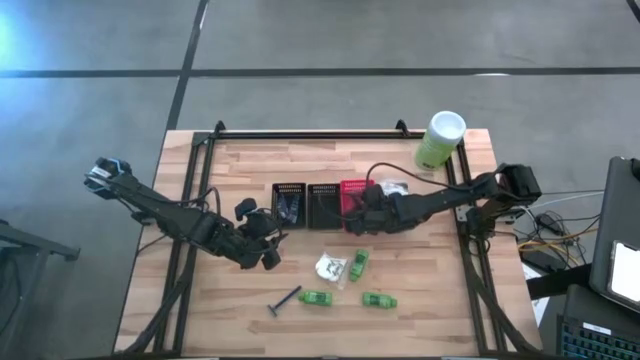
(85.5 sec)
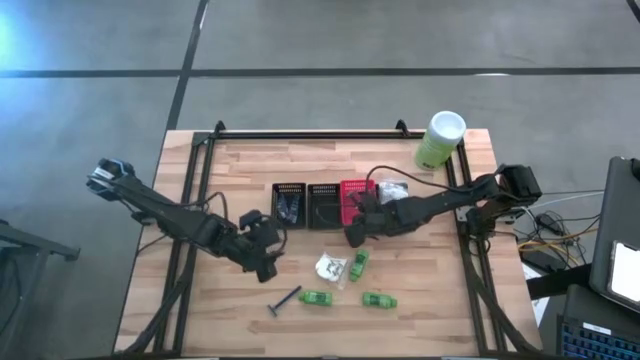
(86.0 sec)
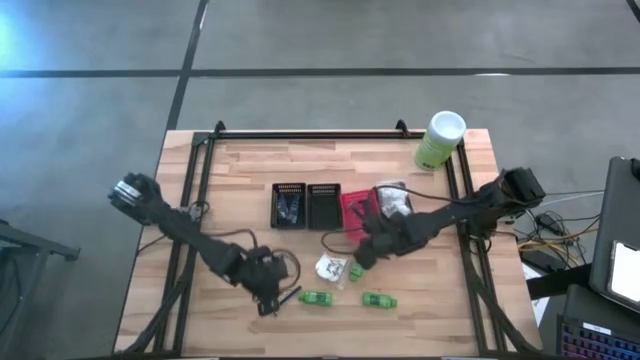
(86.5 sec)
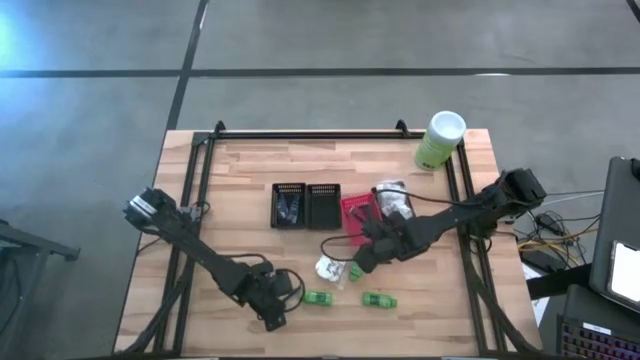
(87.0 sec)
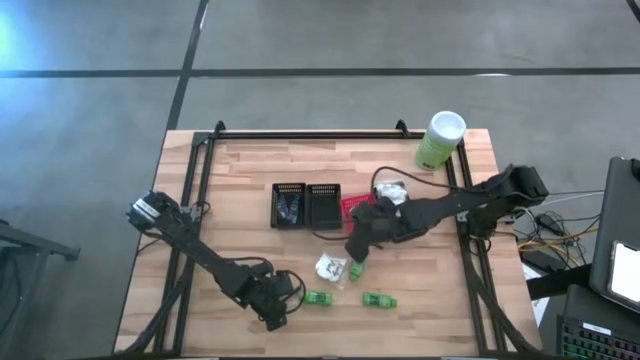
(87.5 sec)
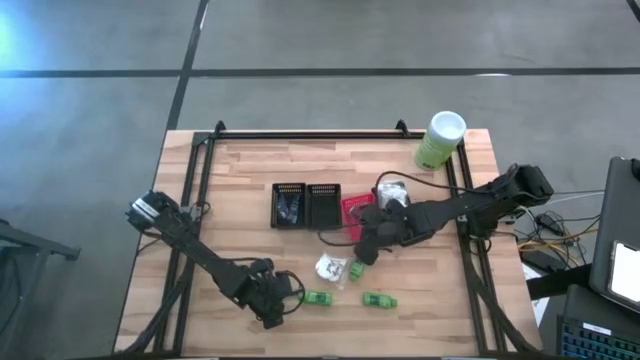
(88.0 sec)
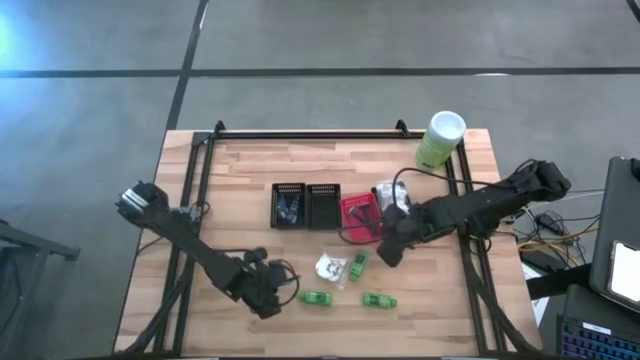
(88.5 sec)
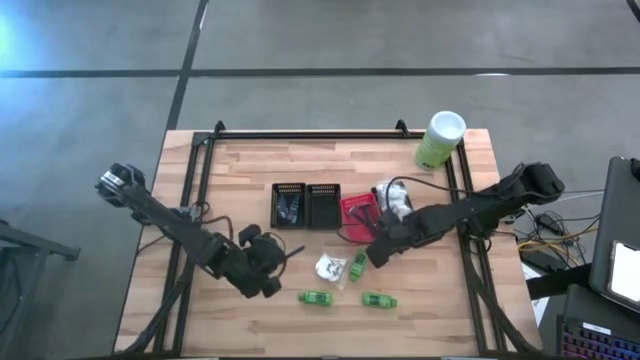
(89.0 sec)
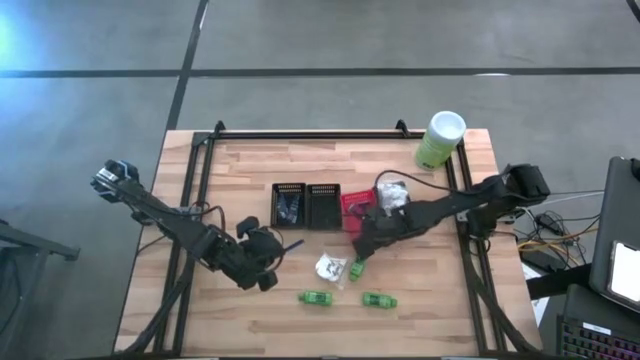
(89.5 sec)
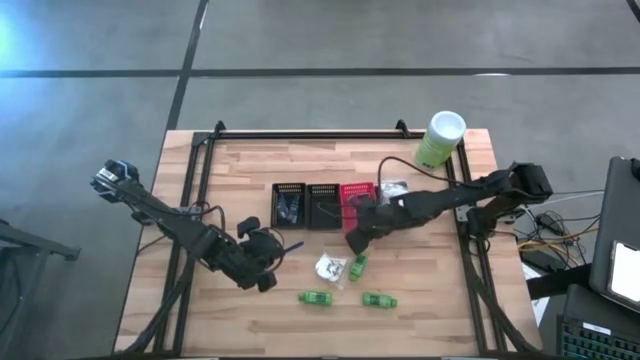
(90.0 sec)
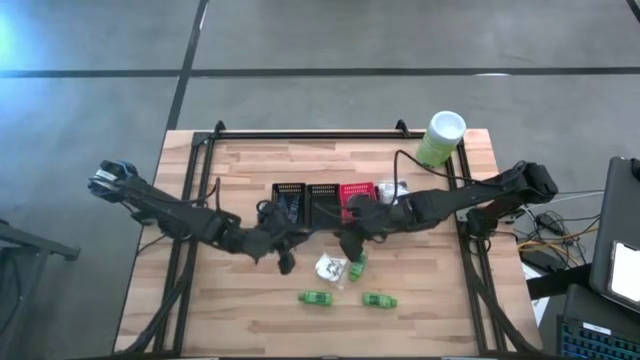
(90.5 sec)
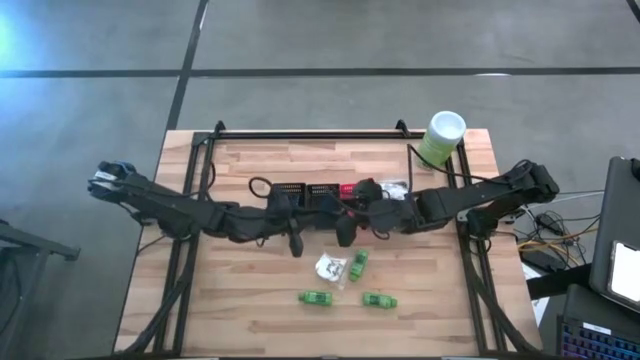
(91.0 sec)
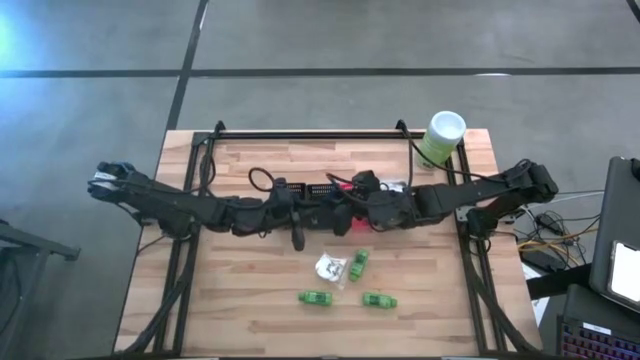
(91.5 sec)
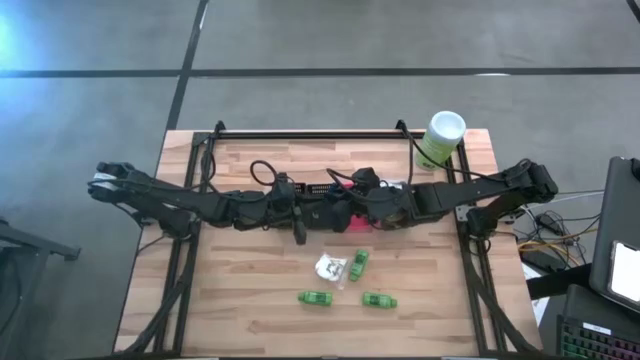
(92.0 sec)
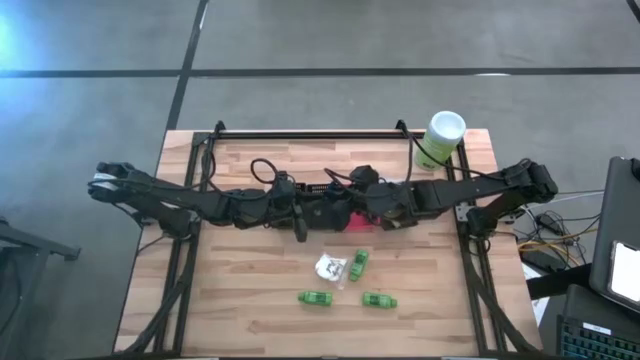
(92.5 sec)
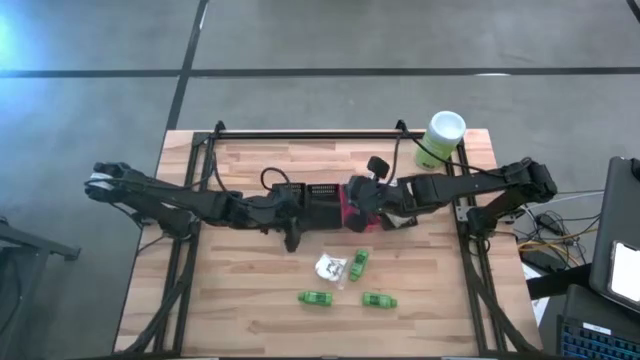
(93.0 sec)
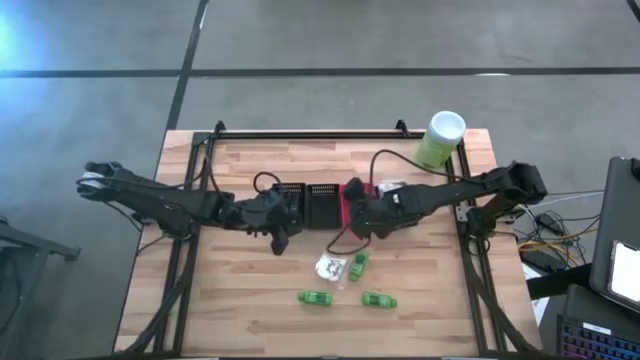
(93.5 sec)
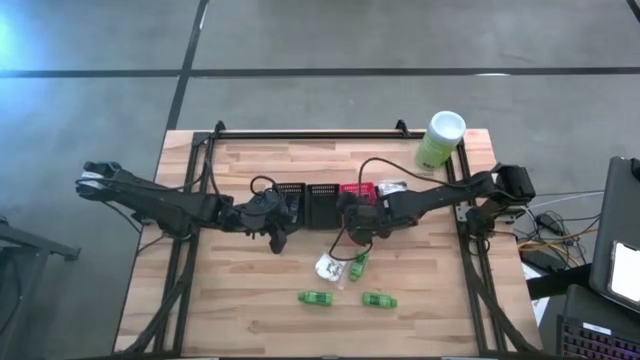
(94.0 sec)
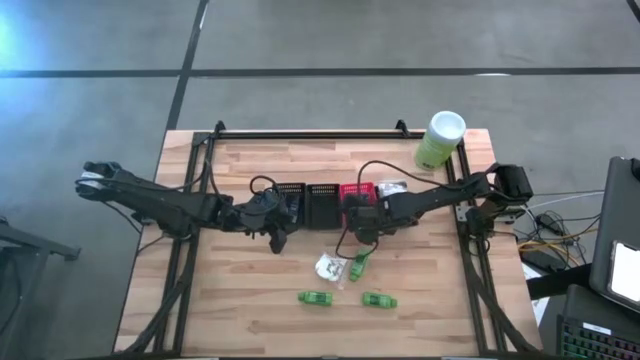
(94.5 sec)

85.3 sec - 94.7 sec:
Task: Pick & Place Travel size toiletries
Put the blue razor into the orange basket

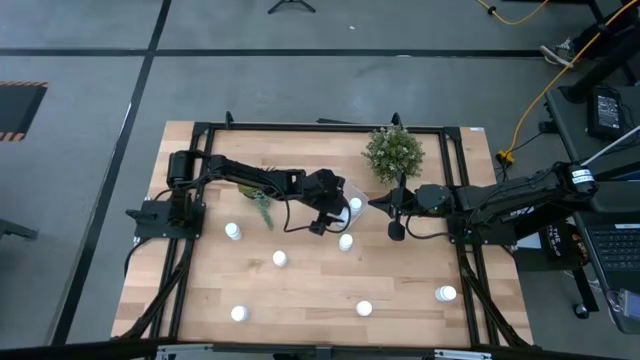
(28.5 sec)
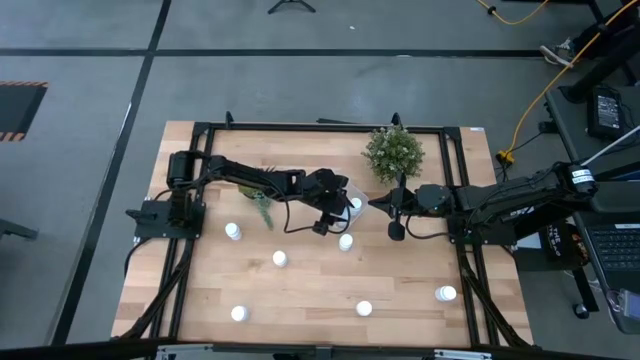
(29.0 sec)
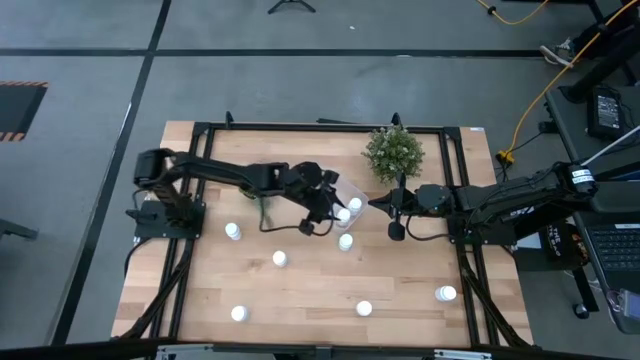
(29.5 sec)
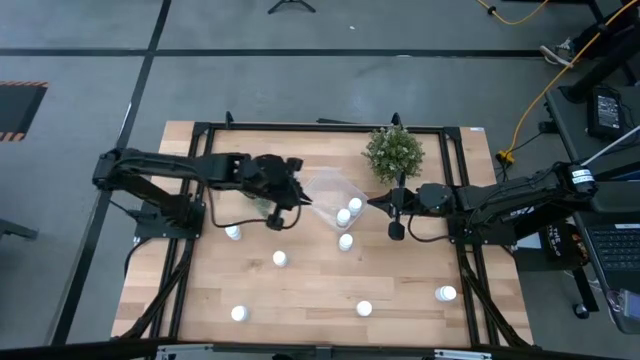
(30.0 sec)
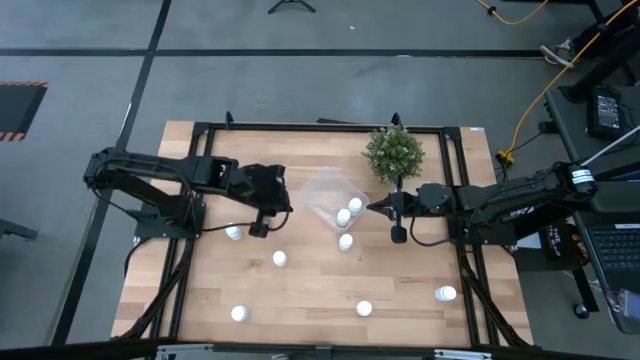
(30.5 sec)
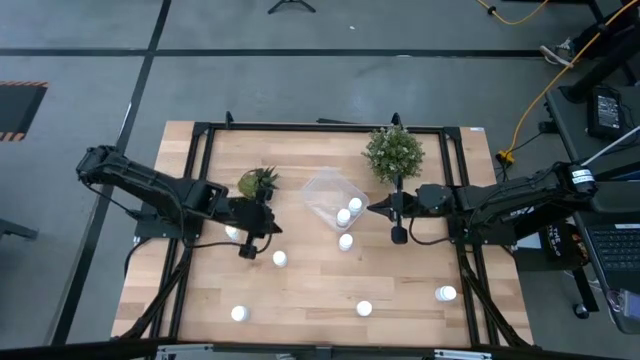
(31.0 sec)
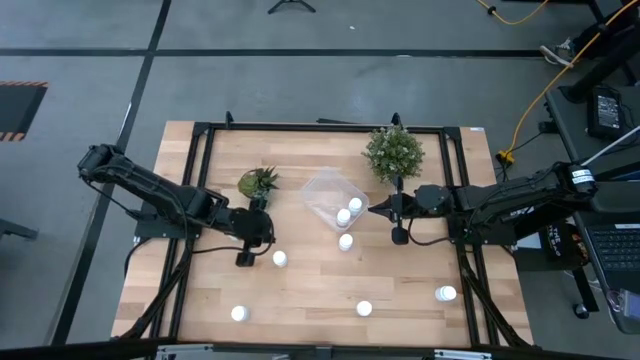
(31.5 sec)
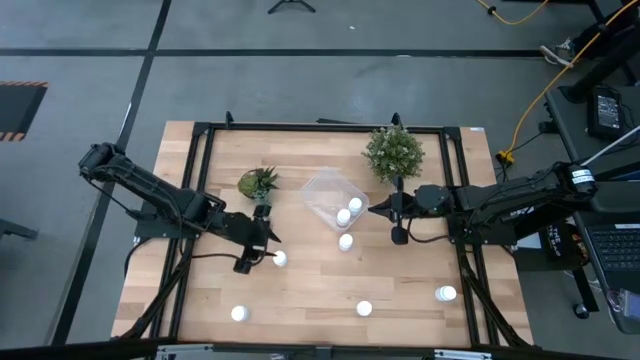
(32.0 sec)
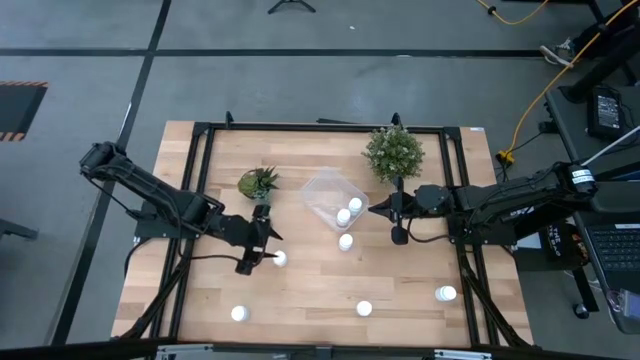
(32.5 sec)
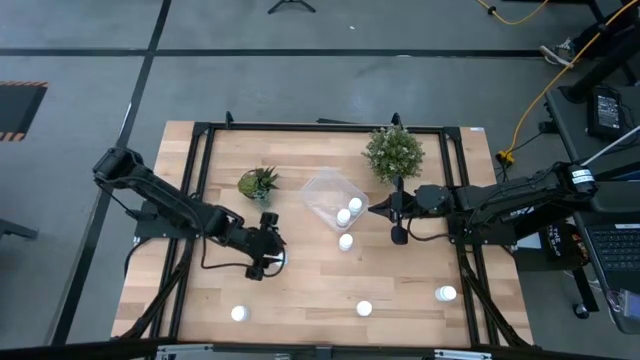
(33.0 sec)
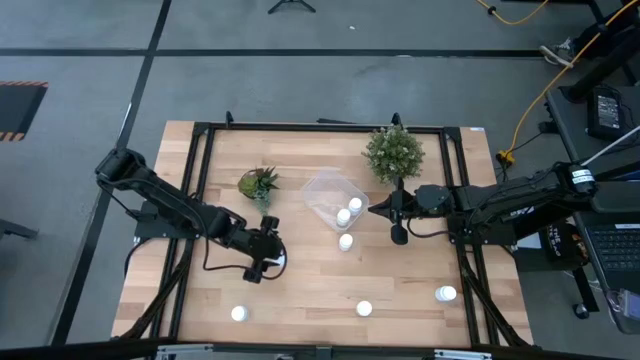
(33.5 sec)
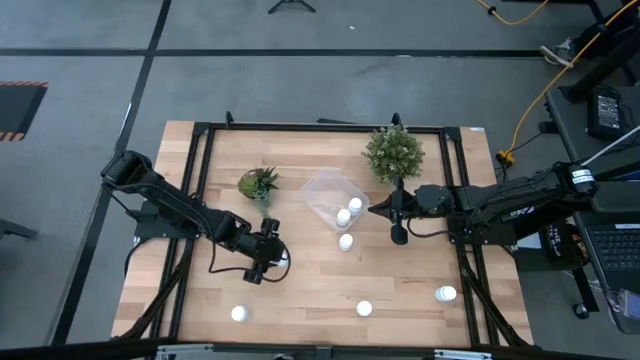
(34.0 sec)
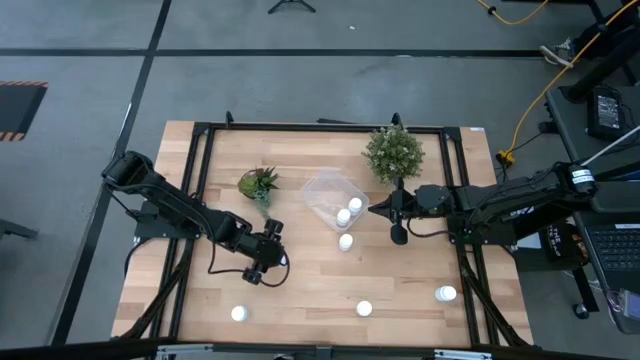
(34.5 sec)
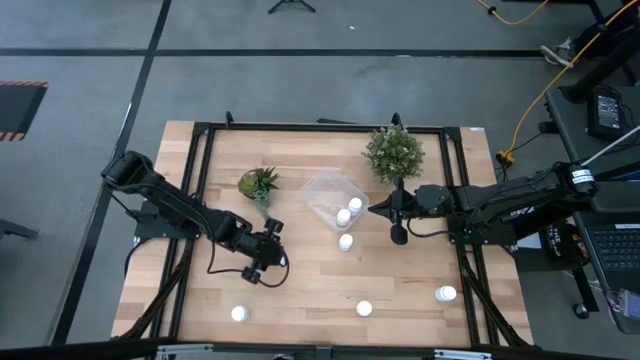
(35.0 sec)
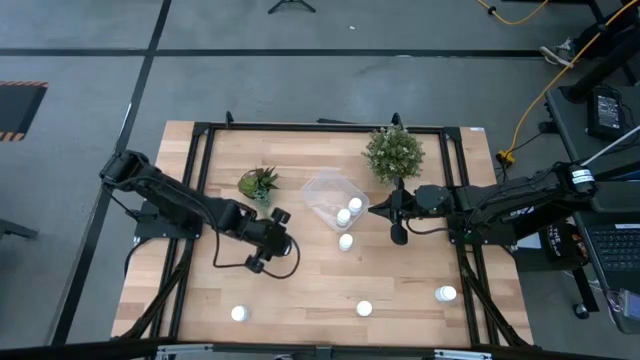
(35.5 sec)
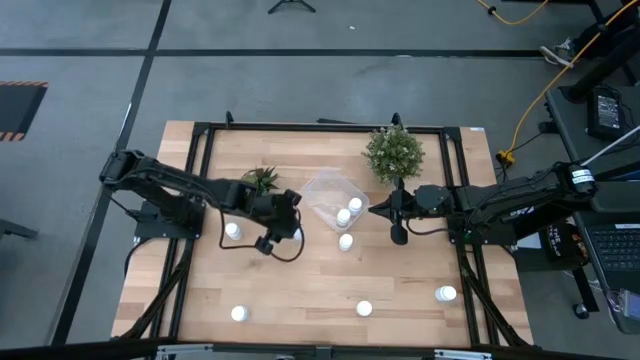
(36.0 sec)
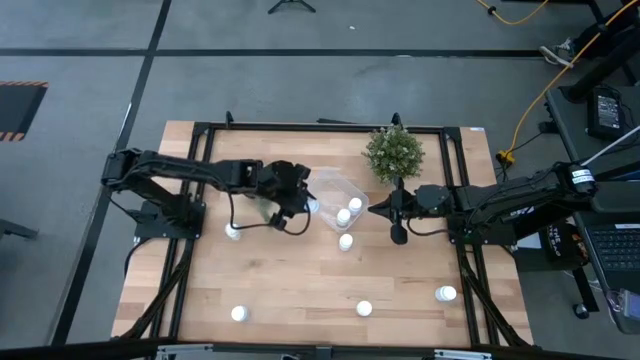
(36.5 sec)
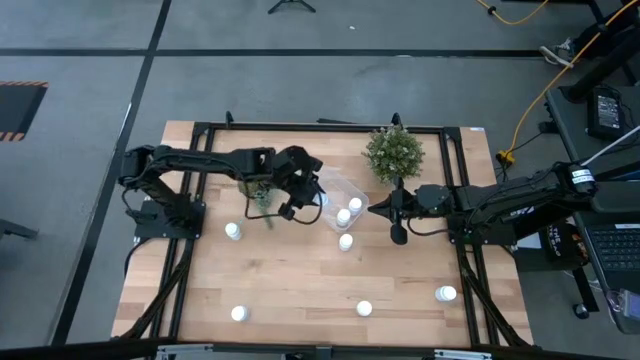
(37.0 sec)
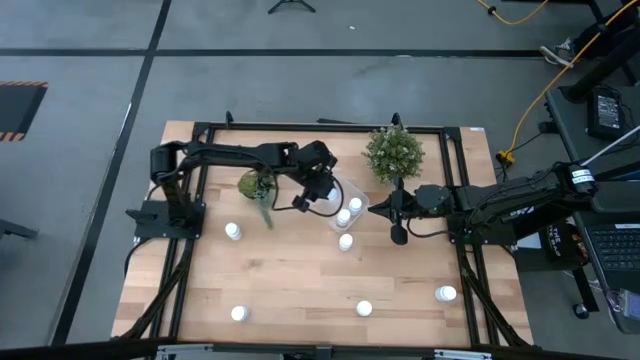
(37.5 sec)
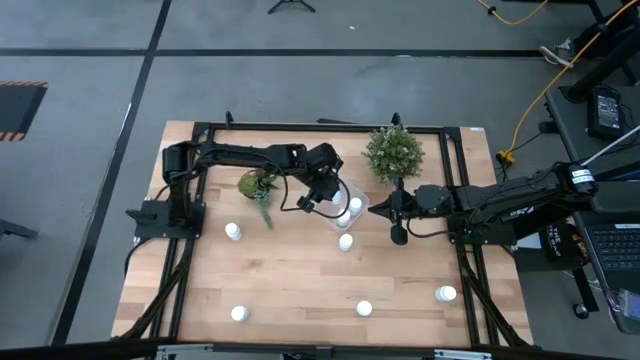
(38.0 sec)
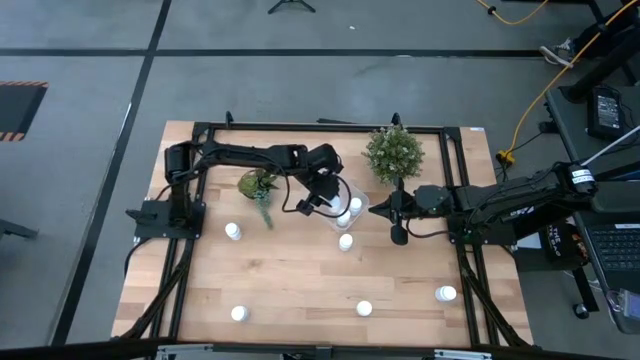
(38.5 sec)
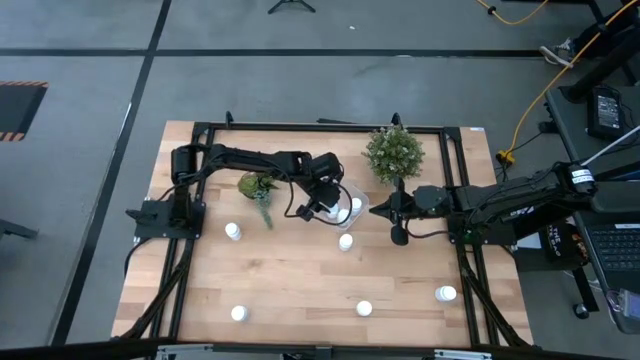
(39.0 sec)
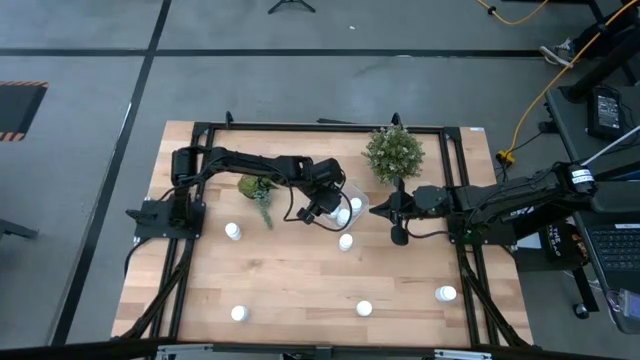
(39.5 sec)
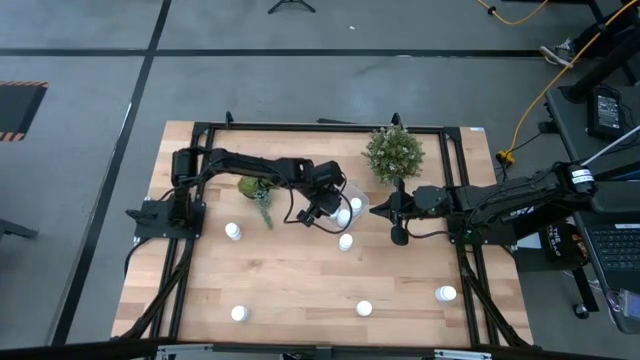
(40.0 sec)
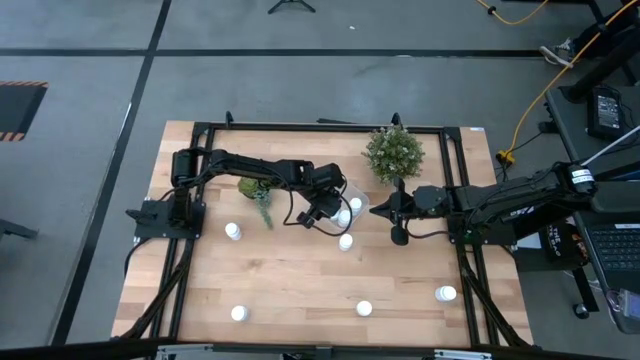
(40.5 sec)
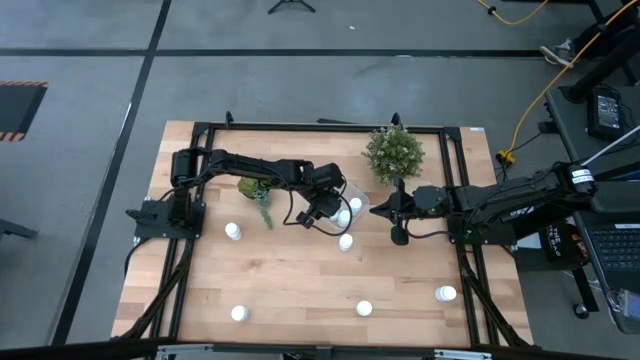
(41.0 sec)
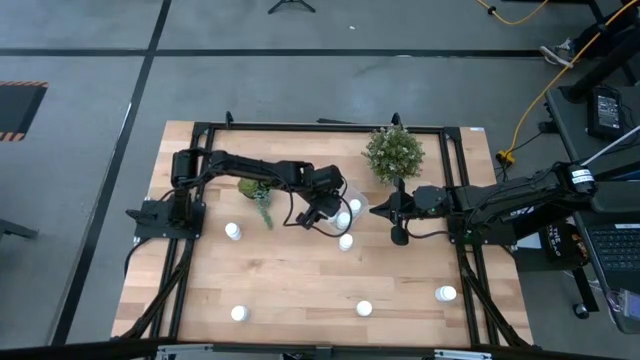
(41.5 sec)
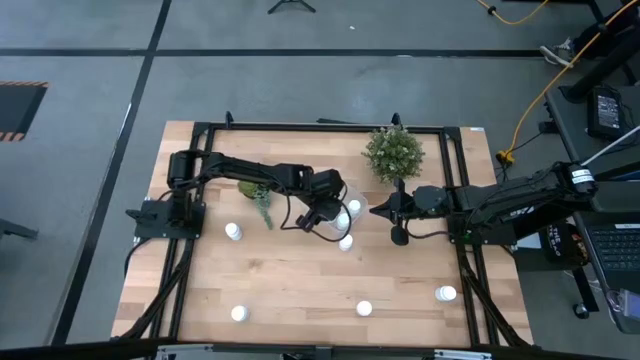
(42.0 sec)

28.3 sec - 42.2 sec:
Task: Pick and place pill bottles into a basket
Put the pill bottle into the transparent bin
